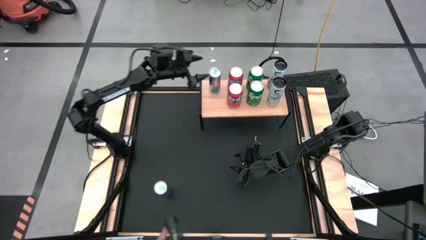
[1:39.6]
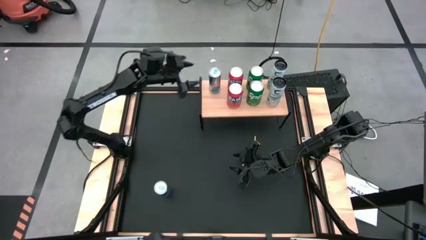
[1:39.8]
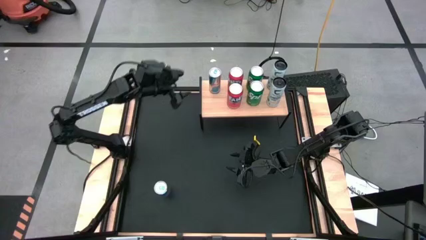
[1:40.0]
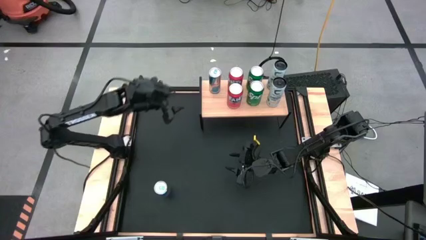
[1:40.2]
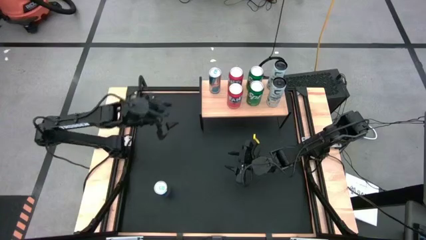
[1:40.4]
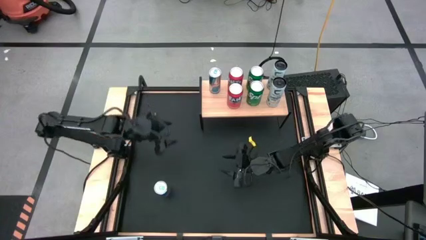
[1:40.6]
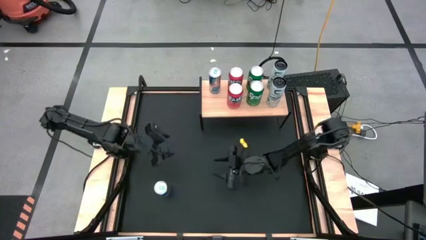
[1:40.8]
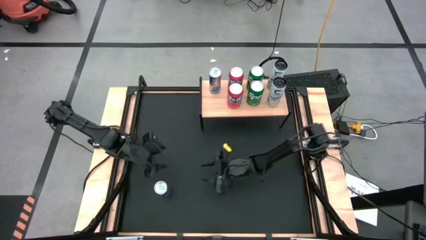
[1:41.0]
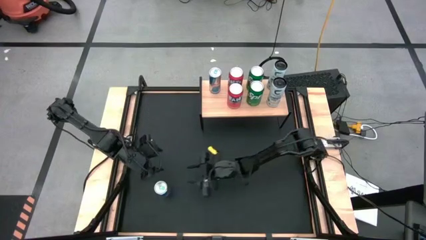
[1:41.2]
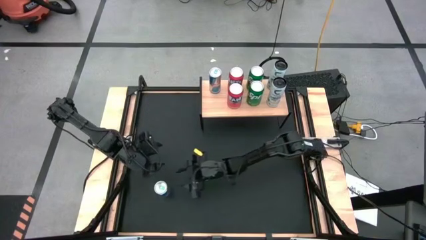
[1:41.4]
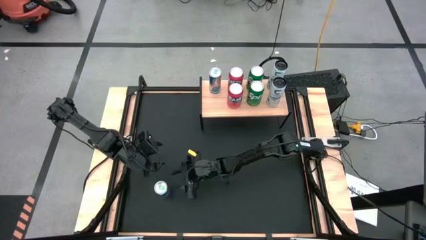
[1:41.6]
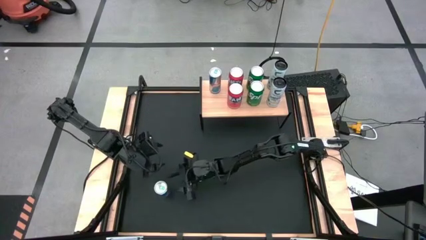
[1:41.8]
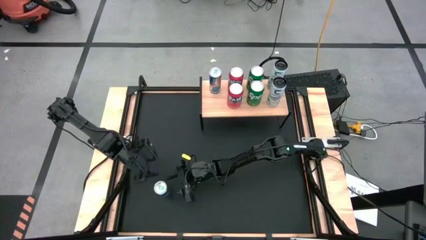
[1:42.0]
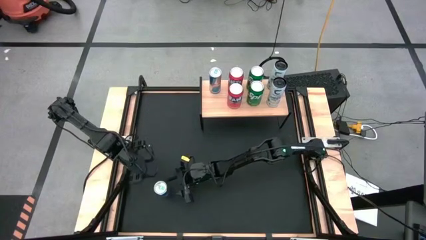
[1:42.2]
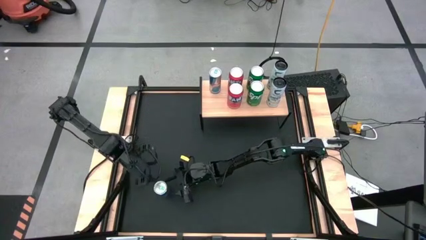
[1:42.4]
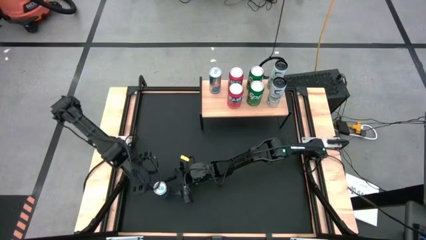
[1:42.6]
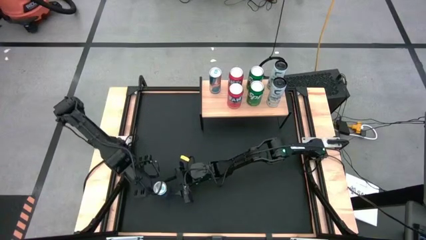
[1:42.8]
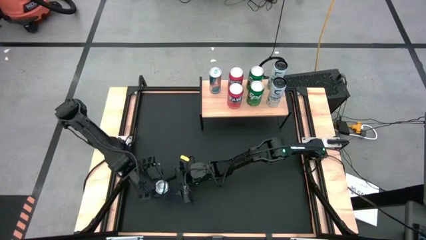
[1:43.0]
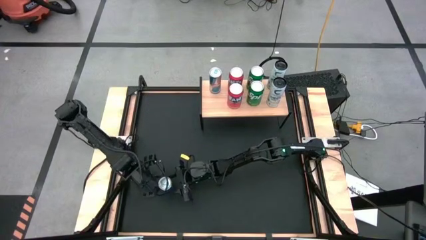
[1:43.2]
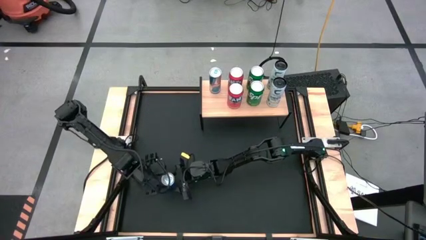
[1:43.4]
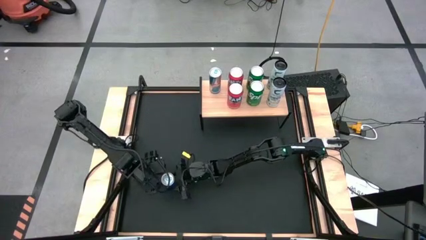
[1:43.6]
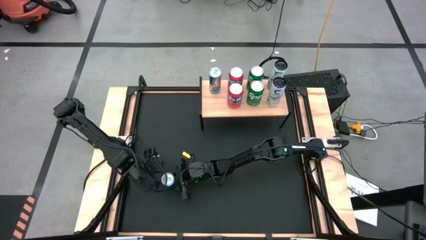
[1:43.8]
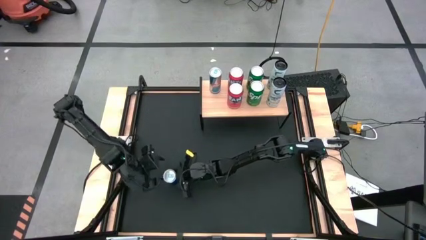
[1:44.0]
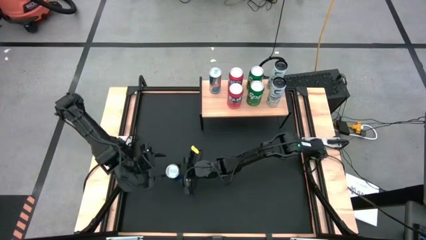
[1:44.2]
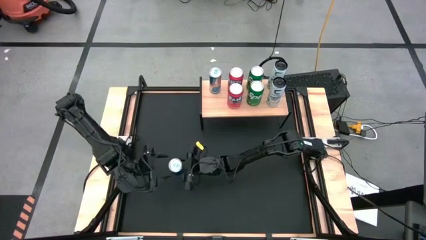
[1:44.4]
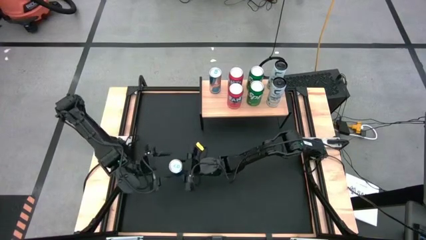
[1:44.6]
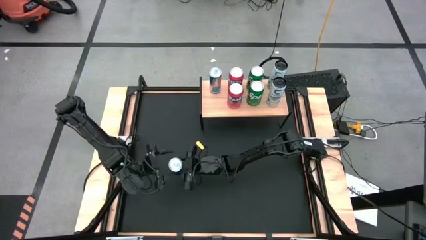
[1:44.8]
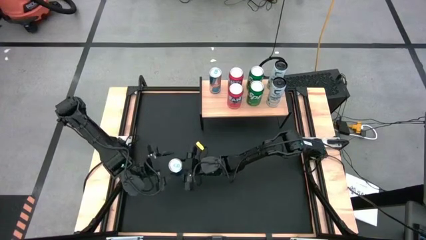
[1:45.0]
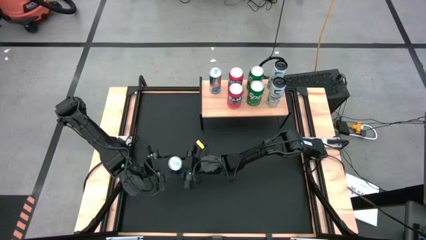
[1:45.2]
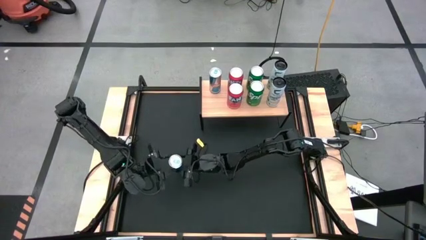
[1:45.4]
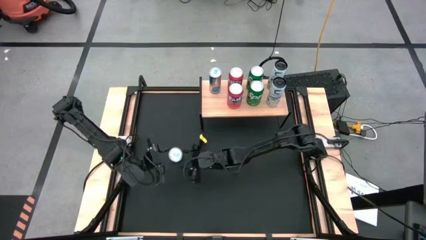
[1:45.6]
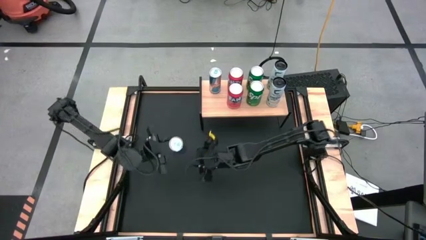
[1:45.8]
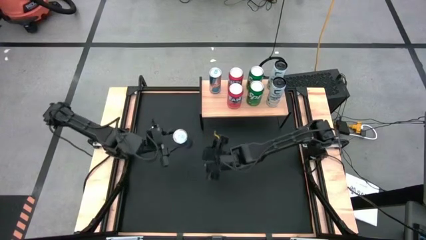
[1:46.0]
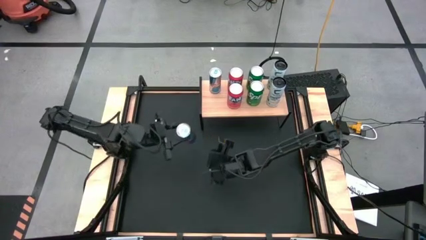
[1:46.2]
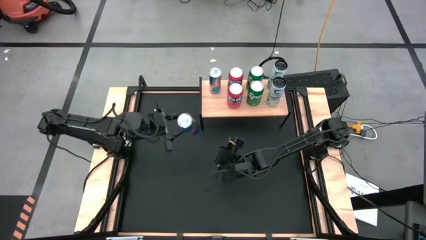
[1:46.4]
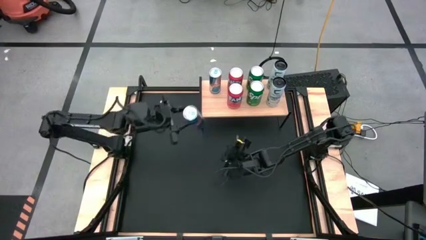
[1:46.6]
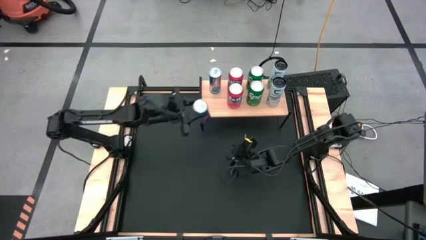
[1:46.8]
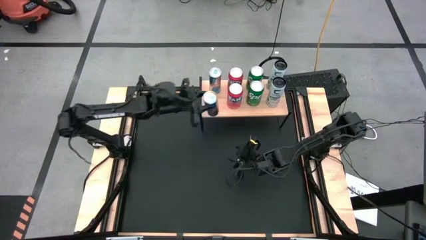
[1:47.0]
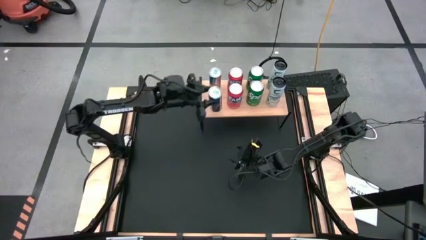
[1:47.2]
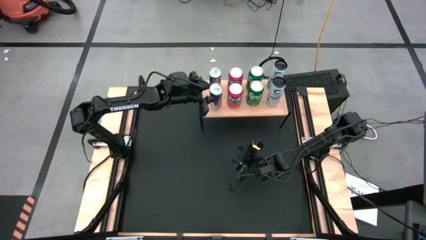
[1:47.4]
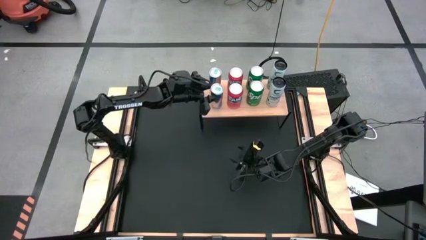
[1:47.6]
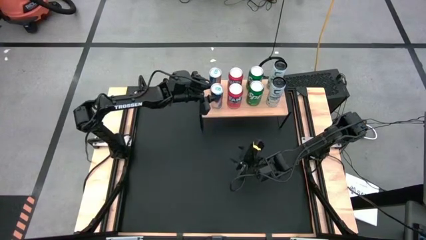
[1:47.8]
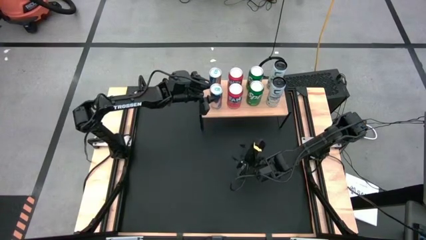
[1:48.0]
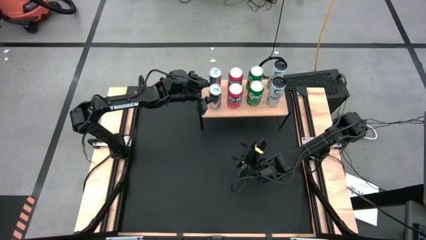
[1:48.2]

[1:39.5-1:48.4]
Task: Place canned beverage on shelf
Put the blue soda can on the shelf

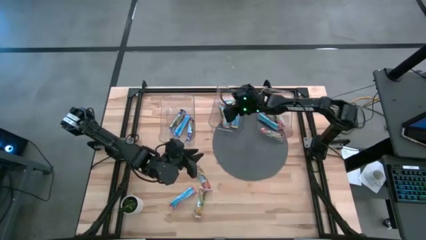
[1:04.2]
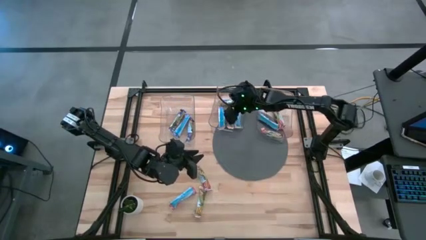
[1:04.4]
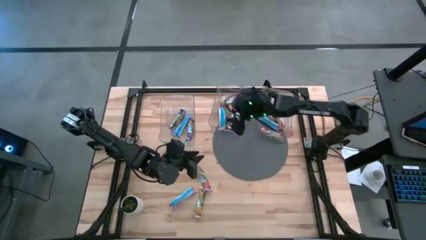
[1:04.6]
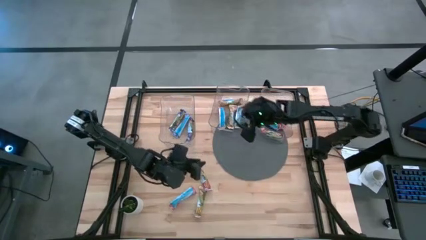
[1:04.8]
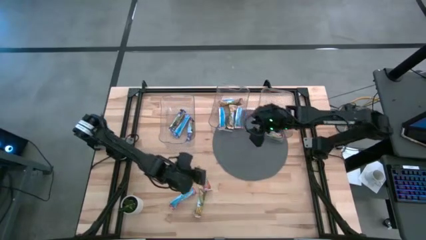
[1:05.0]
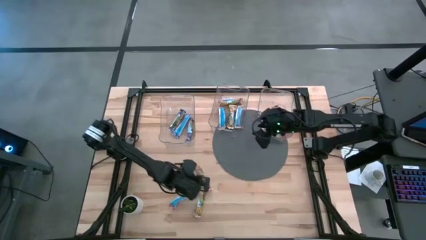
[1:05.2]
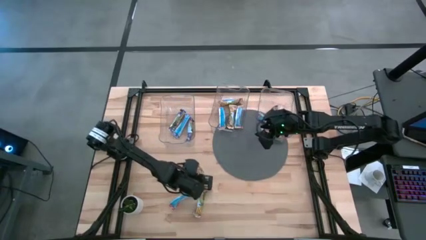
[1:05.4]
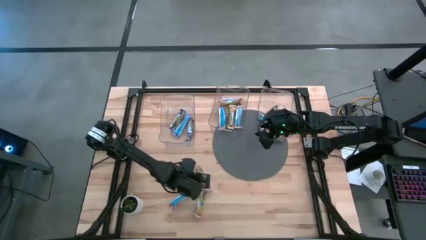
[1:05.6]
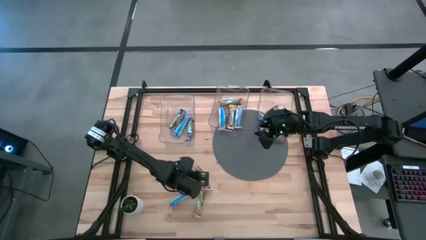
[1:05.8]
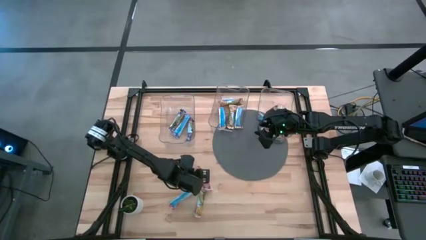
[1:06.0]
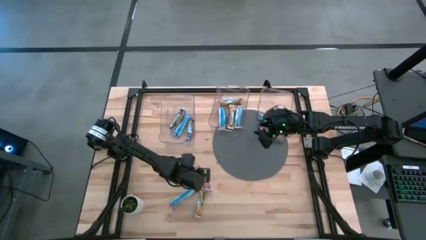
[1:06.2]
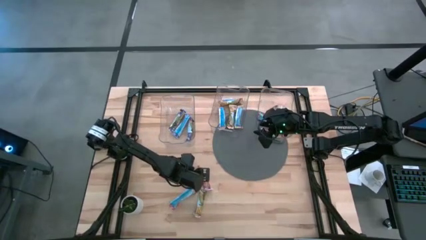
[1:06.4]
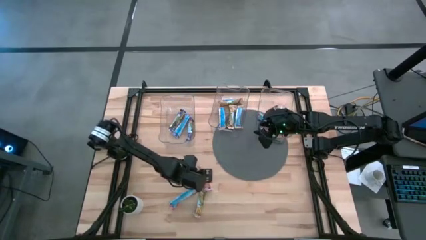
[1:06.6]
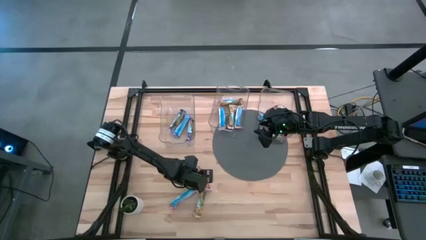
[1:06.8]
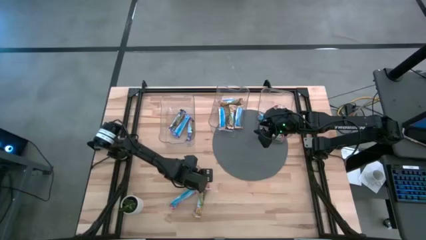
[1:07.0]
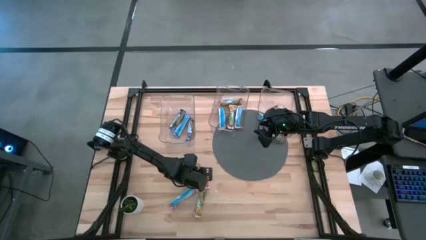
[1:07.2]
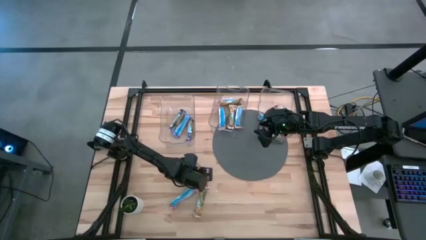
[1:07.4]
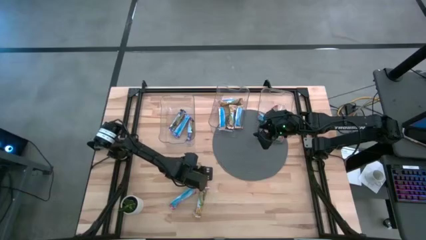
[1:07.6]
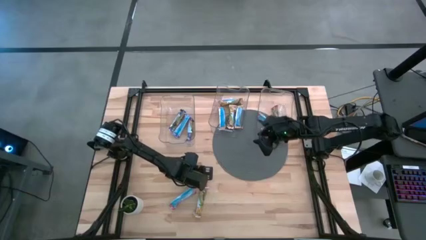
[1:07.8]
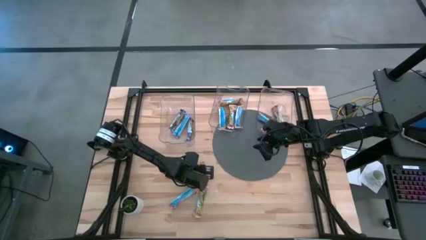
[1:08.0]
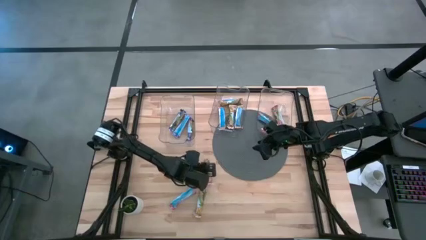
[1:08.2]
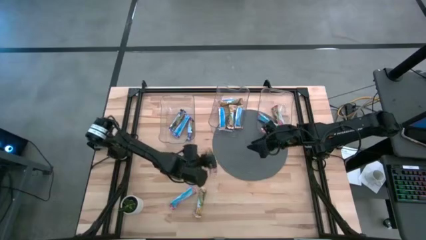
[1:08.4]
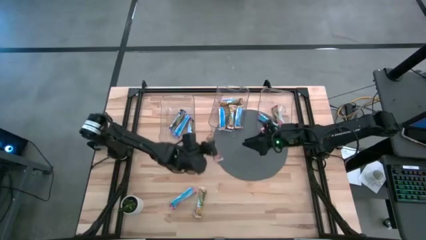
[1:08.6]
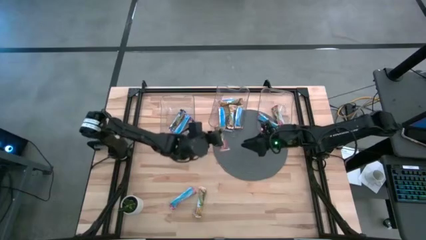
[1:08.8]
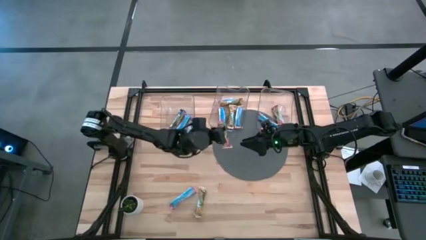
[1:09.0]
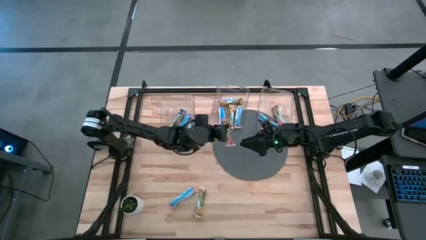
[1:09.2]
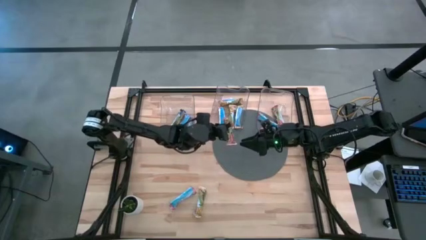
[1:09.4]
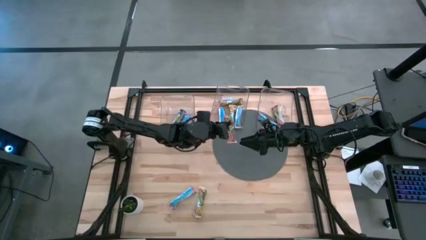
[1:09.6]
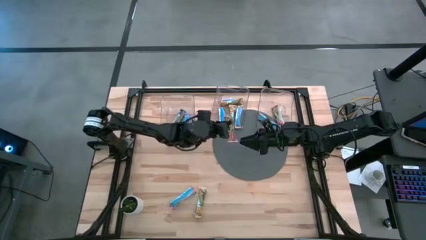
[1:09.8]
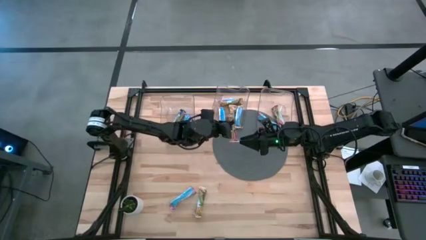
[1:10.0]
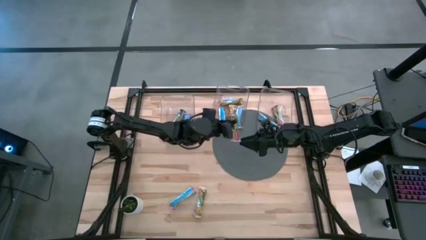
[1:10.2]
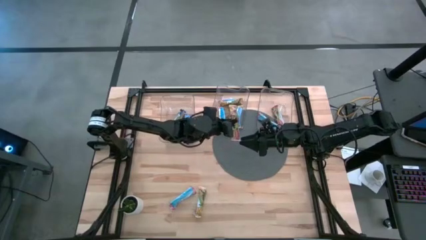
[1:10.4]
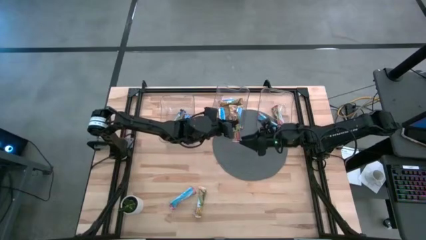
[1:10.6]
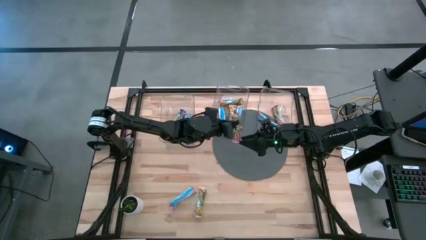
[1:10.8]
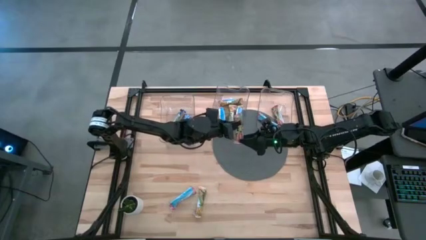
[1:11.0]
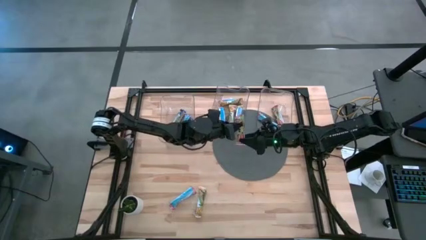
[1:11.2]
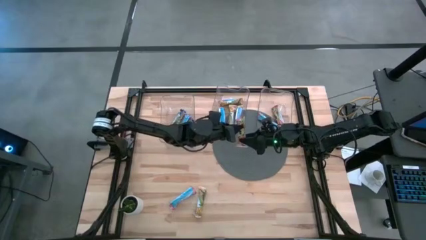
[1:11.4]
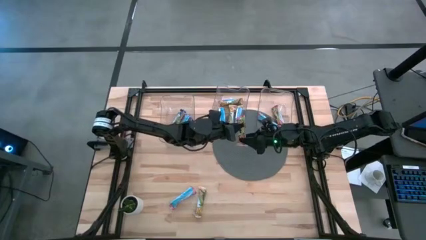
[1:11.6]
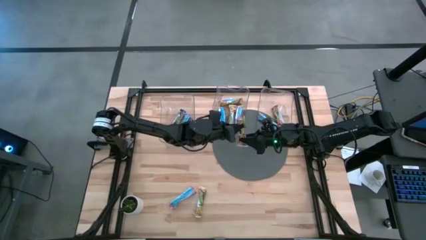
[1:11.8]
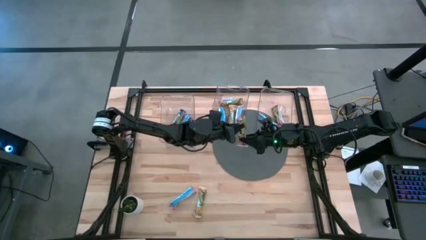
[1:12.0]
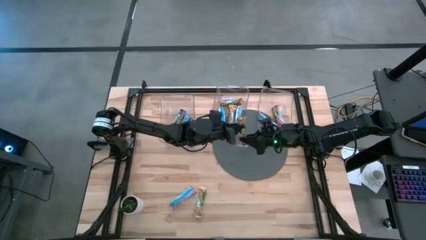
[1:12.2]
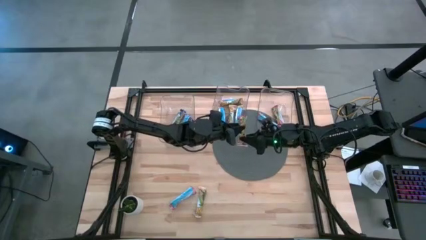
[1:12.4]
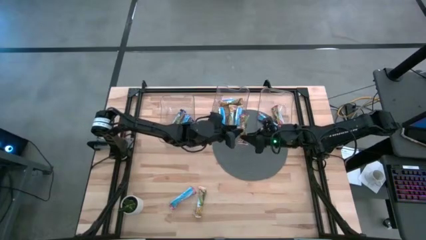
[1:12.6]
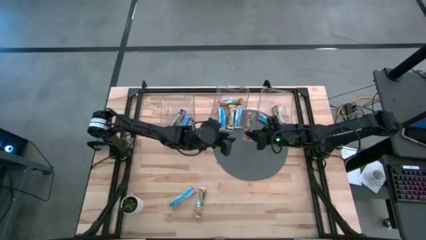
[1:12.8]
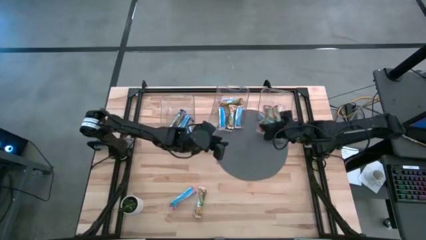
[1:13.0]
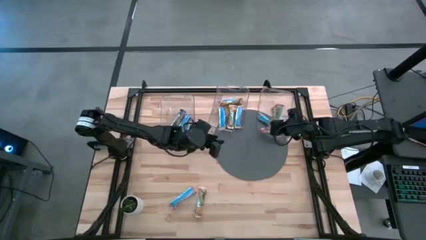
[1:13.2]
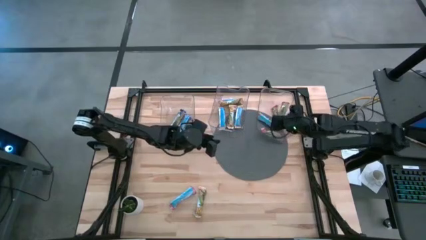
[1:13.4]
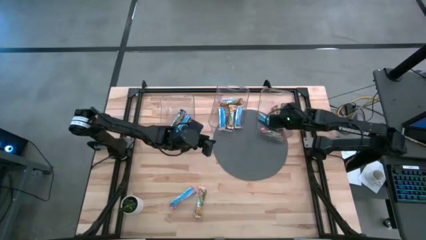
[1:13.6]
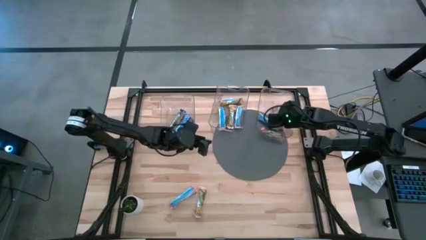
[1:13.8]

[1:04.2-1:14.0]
Task: Pick and place Granola Bars by type
Put the red granola bar into the right transparent bin
